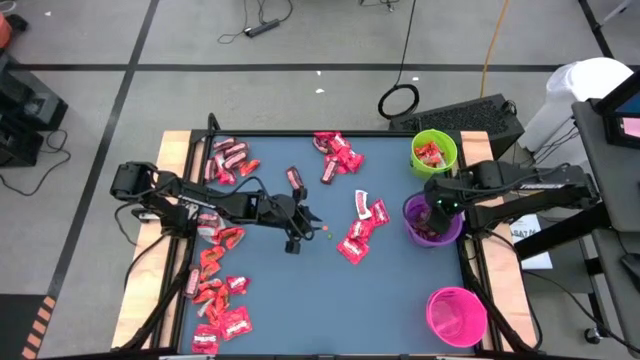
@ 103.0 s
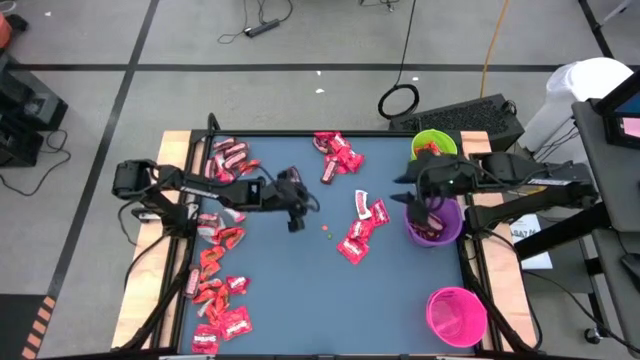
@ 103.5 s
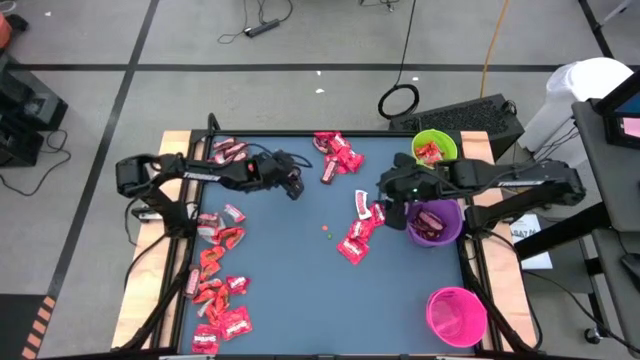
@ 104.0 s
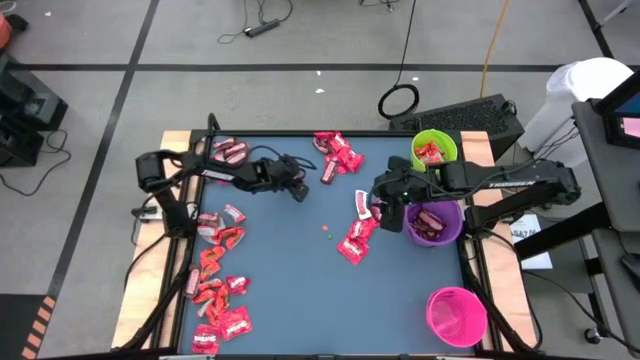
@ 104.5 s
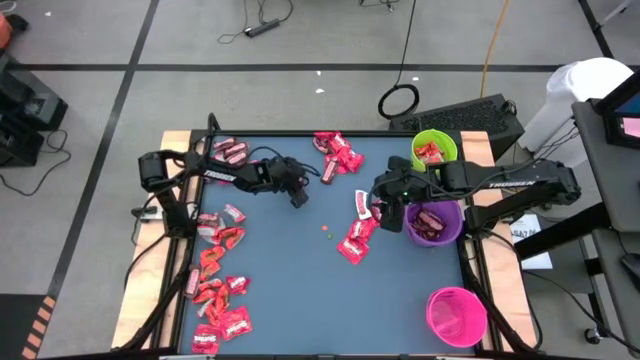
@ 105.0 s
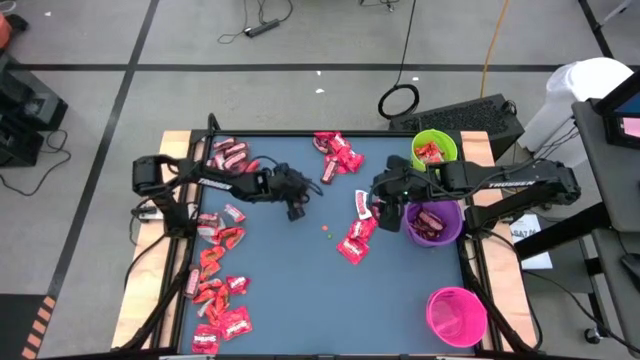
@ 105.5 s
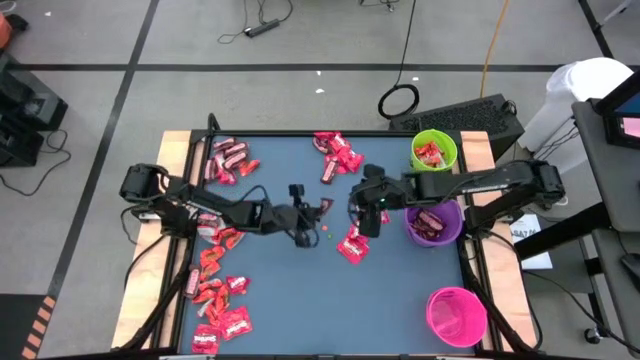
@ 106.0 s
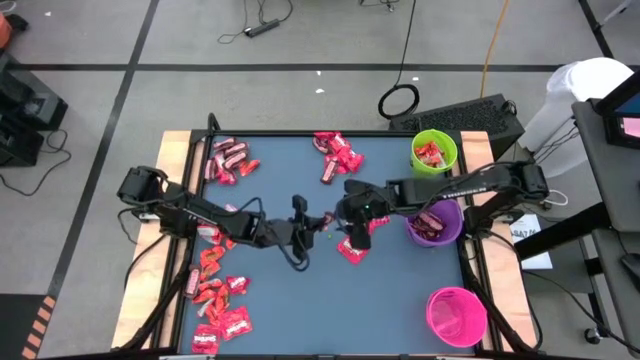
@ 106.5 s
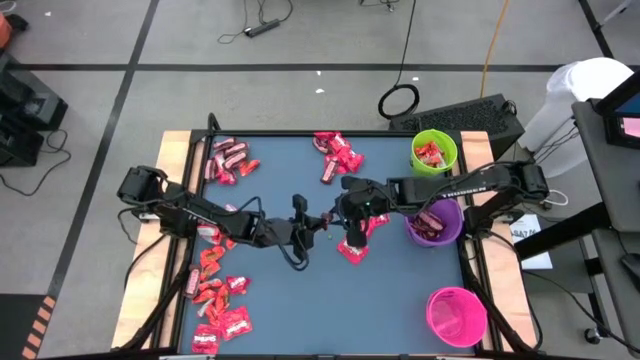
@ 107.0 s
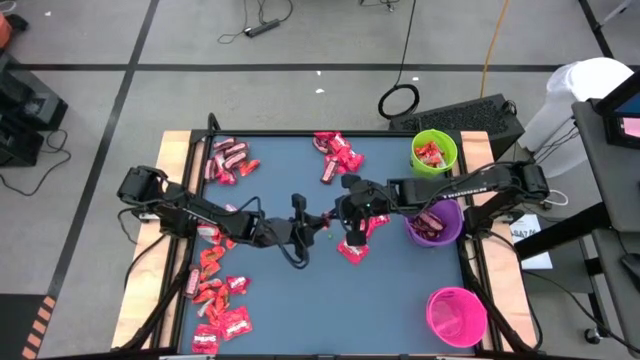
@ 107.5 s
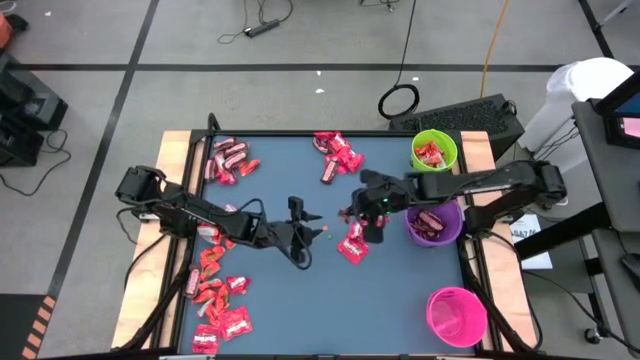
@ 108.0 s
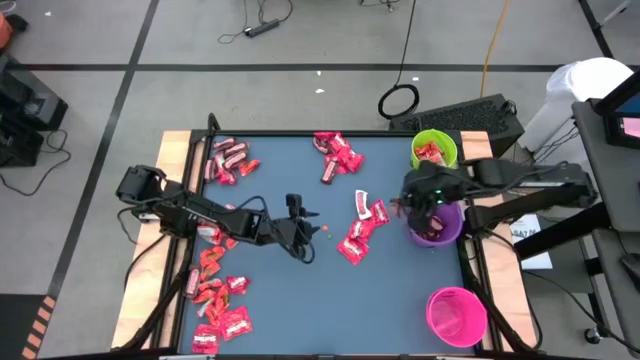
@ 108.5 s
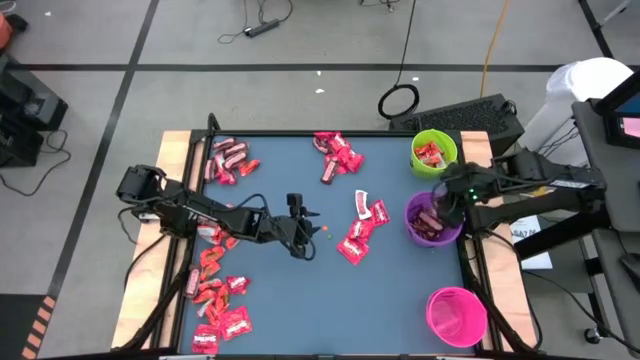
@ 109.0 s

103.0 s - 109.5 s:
Task: Organize candy in baskets
Put the brown chocolate bar into the violet bucket

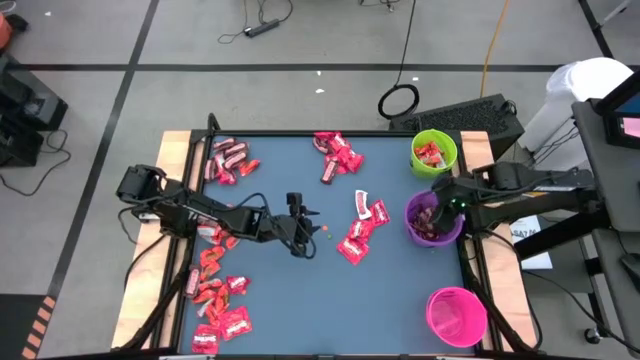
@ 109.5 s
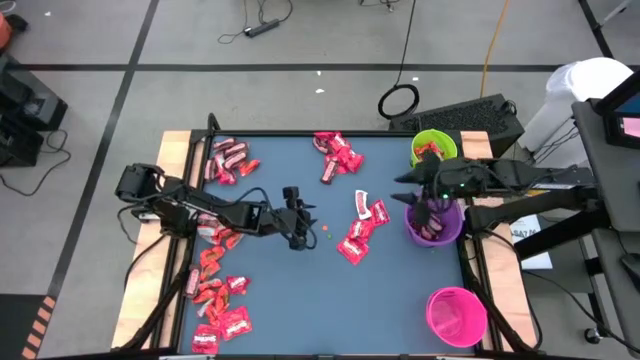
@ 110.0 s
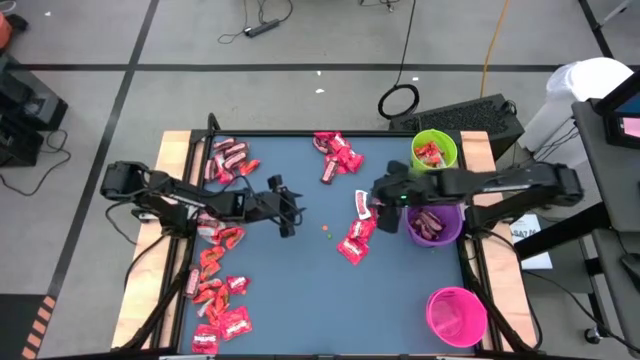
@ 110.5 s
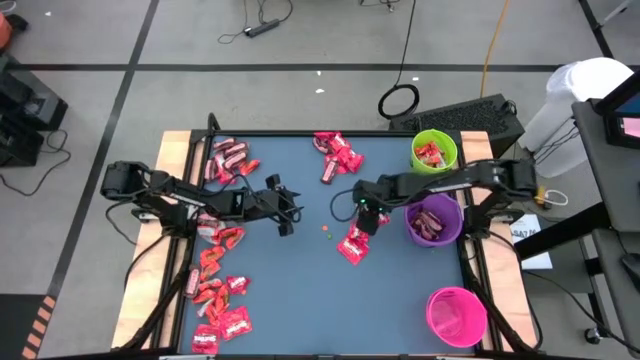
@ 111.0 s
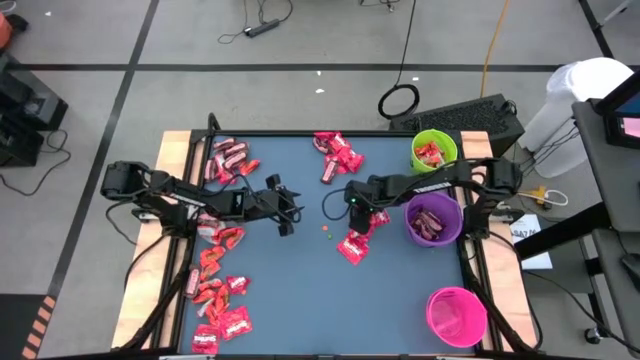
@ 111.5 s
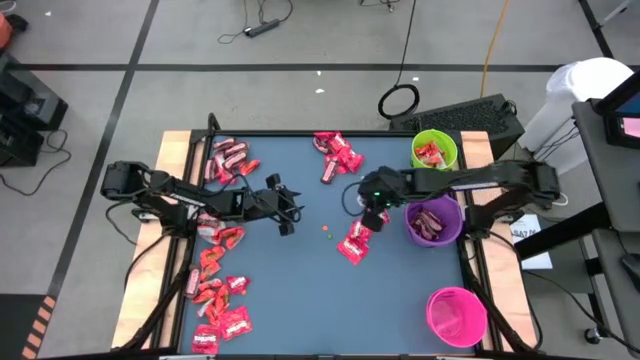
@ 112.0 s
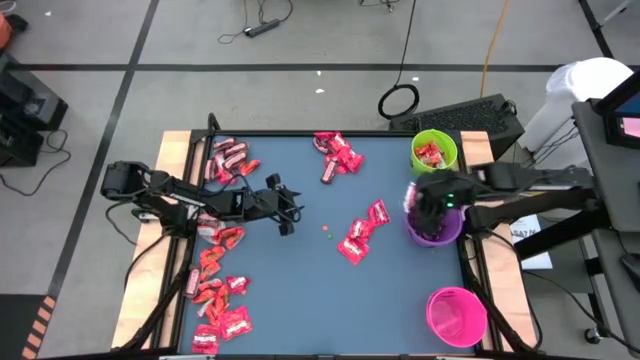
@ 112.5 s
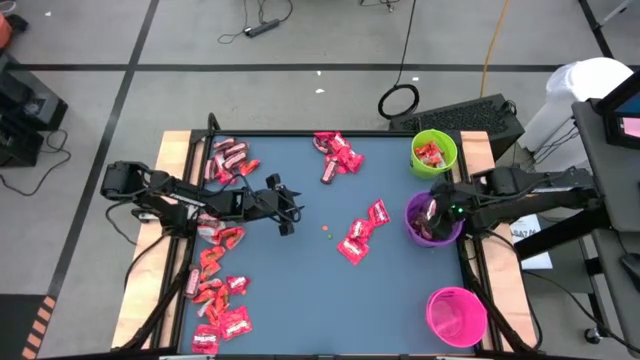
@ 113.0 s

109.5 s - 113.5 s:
Put the white chocolate bar into the violet bucket

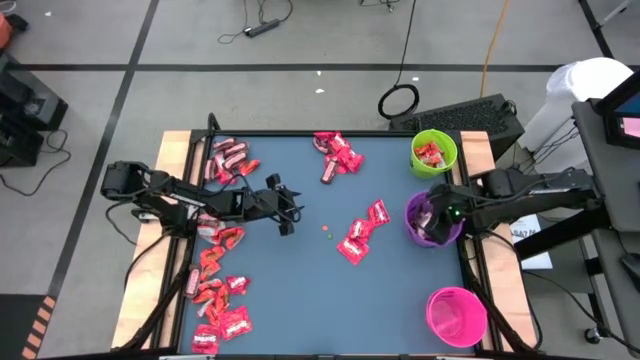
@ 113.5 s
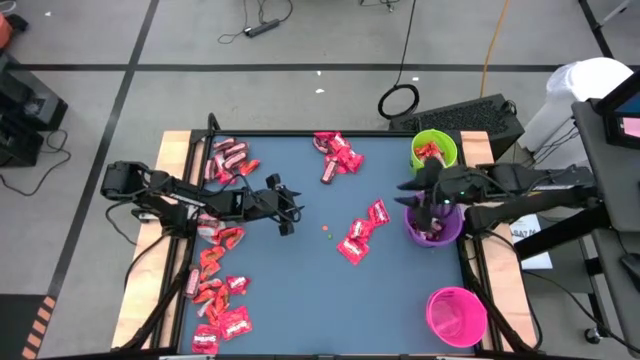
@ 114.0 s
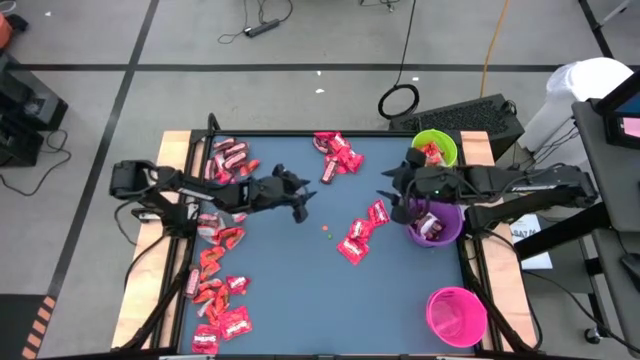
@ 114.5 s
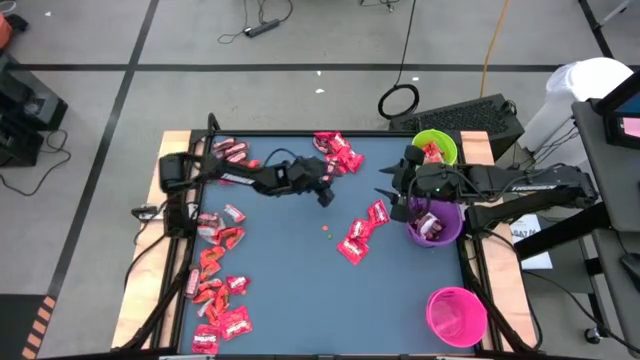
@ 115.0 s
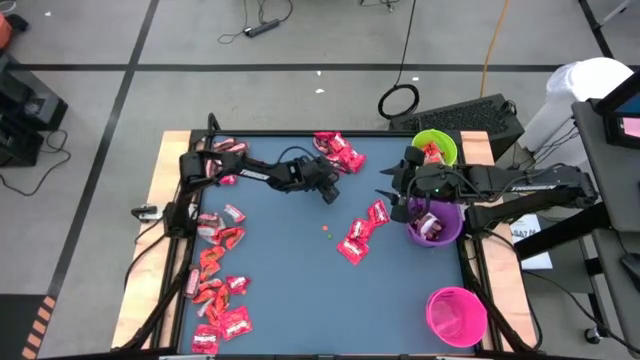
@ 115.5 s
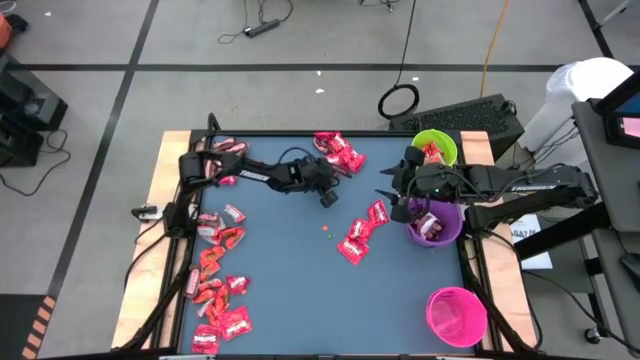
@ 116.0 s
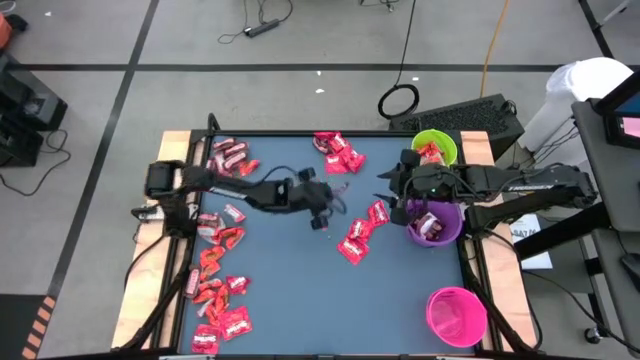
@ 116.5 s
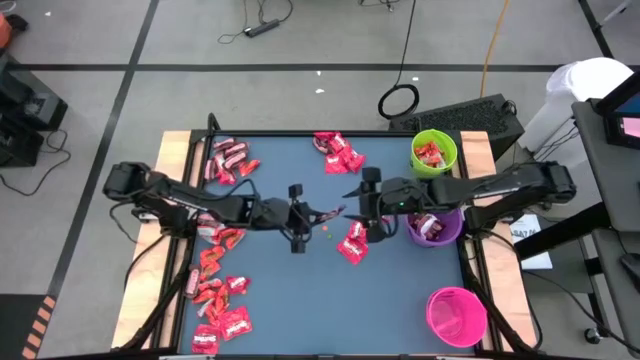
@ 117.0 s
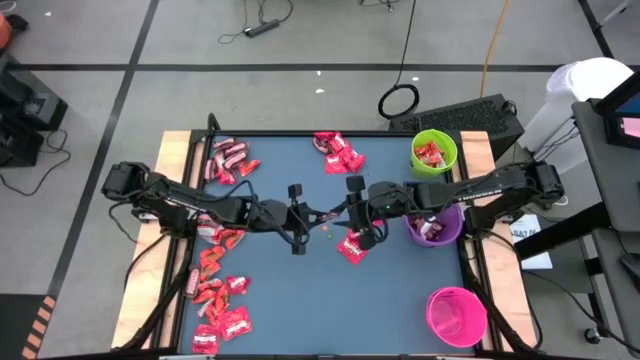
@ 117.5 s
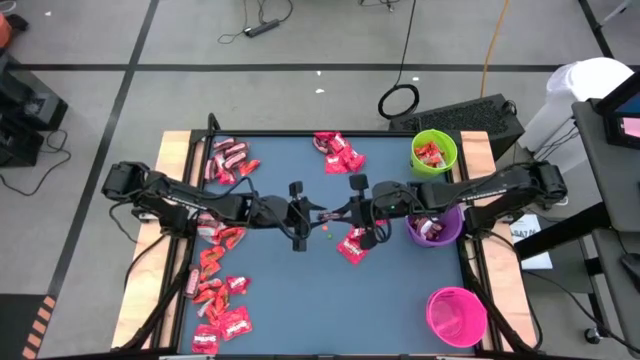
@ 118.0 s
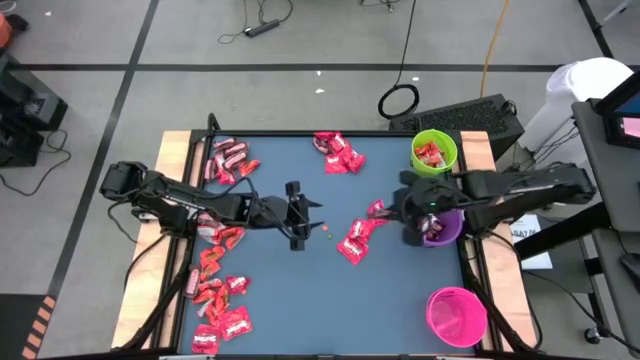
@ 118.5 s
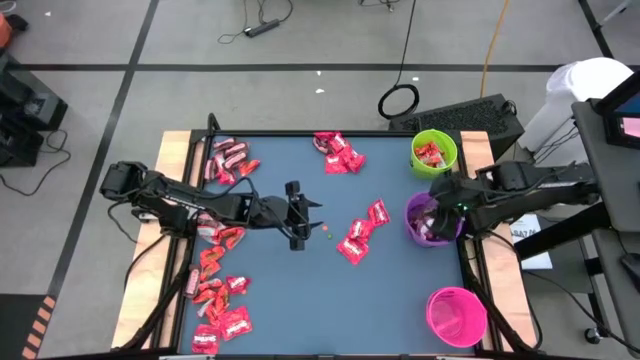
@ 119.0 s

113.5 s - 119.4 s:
Put the brown chocolate bar into the violet bucket

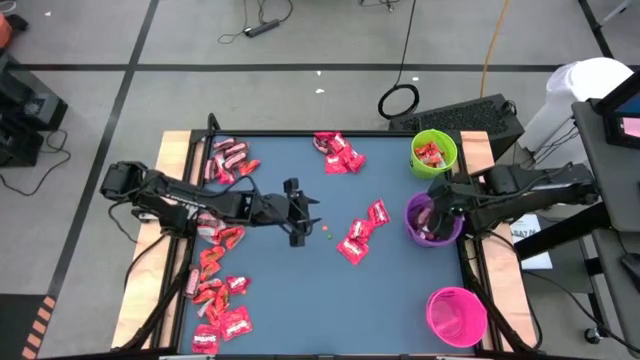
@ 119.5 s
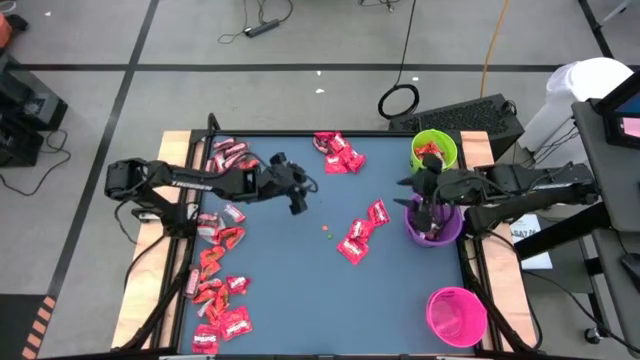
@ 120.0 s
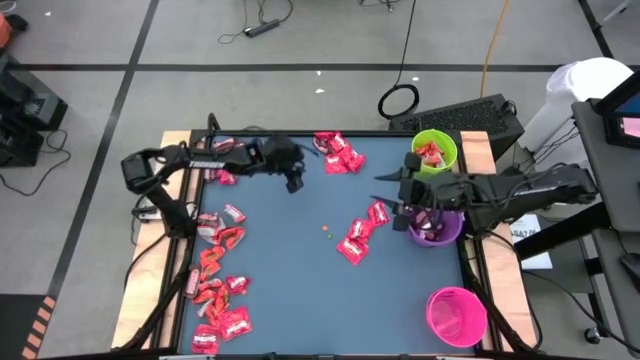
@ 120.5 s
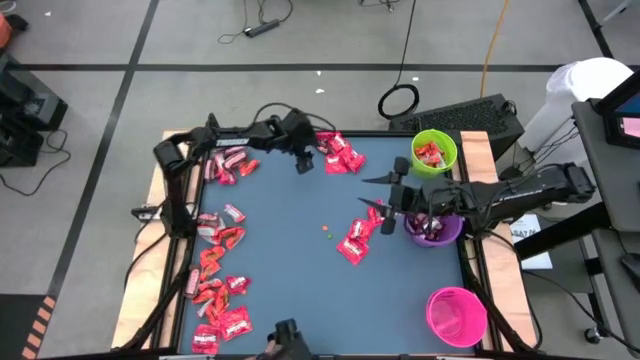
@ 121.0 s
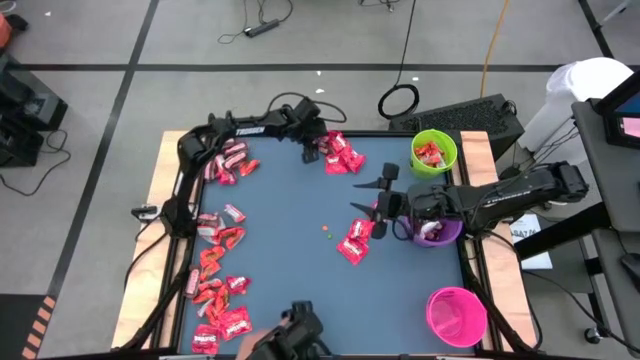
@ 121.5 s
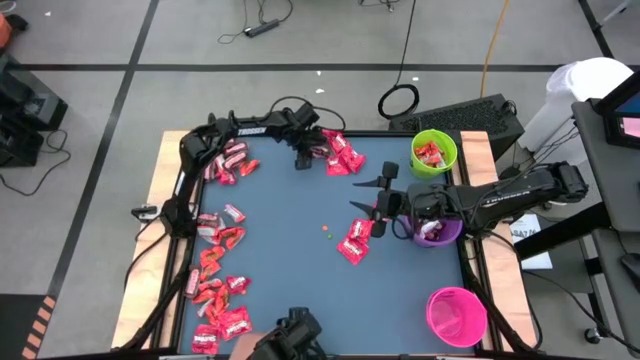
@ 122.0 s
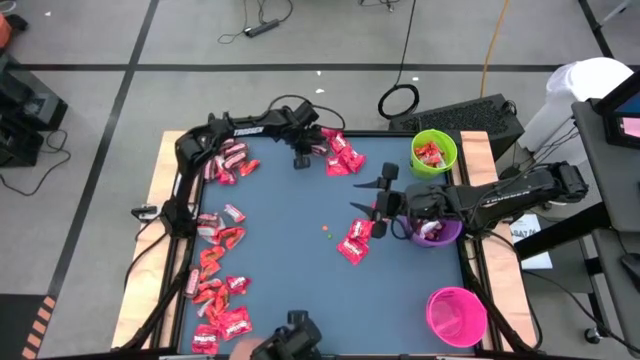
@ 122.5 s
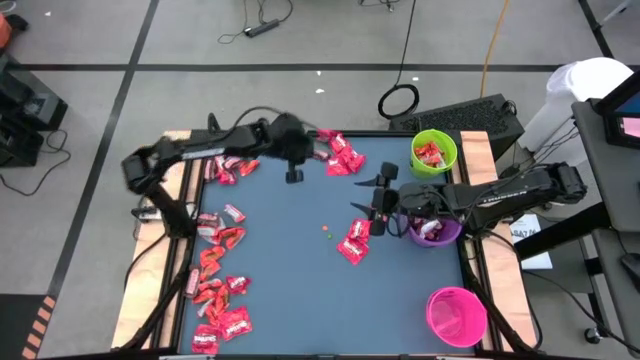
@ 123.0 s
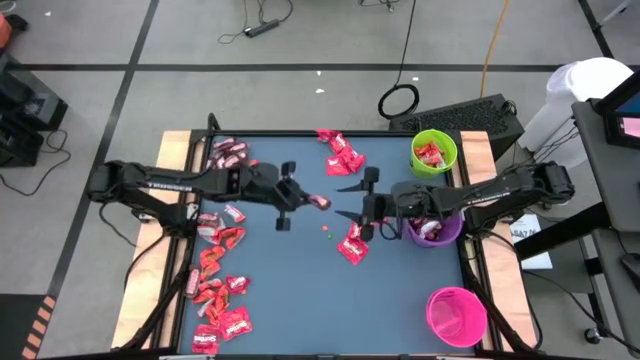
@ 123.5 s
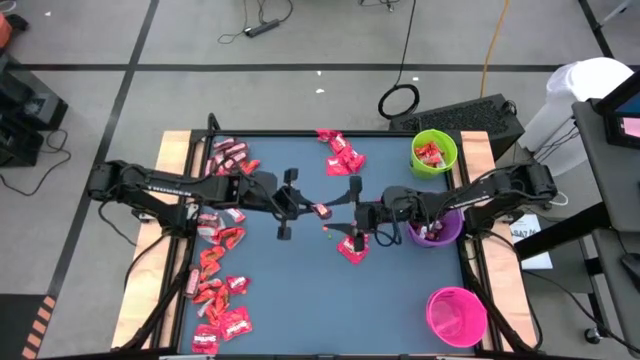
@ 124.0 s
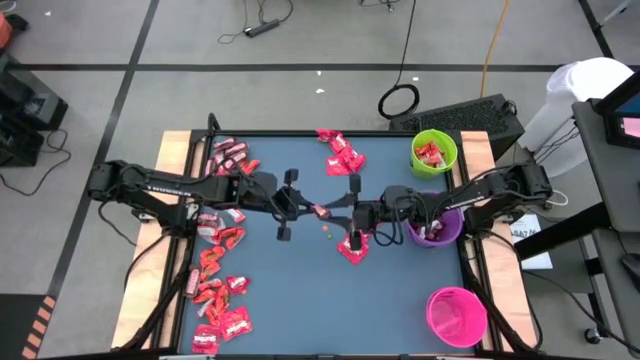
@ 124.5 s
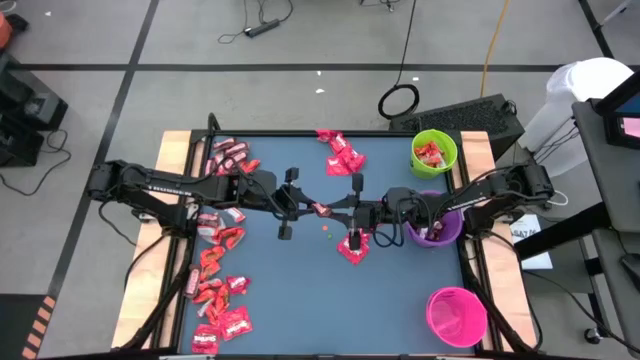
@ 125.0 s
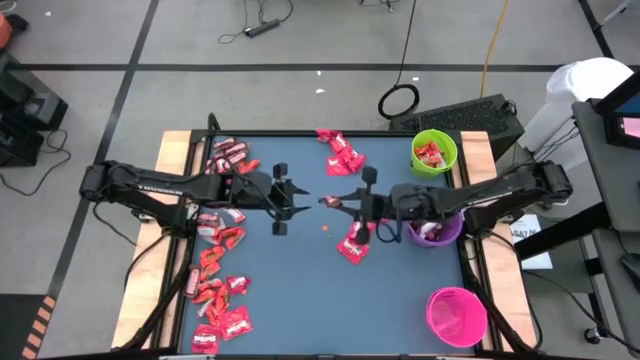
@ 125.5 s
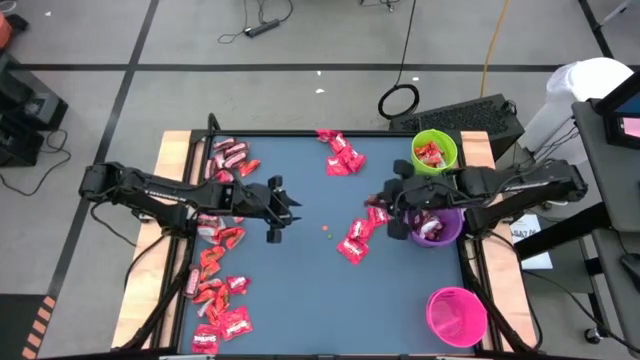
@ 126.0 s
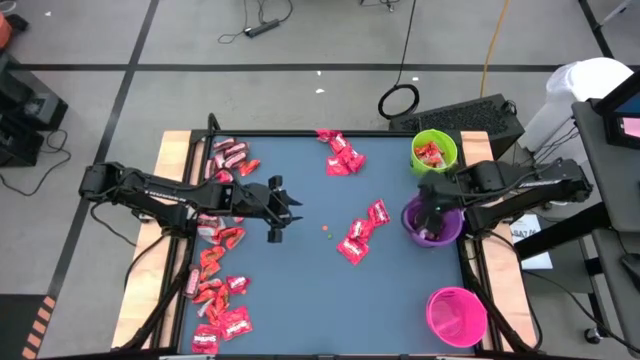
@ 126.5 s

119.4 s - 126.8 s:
Put the brown chocolate bar into the violet bucket
